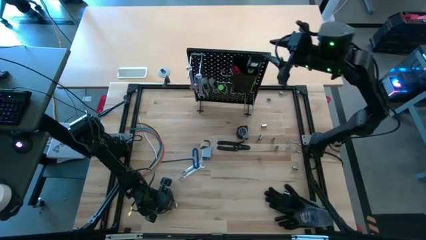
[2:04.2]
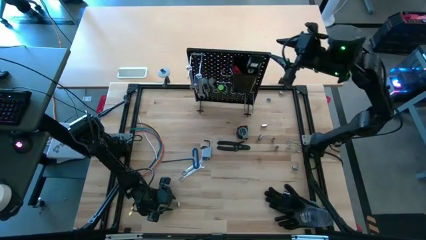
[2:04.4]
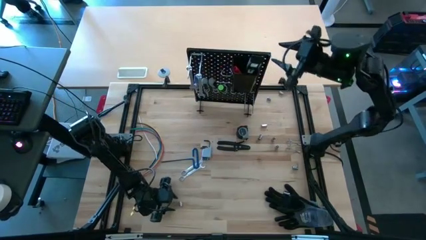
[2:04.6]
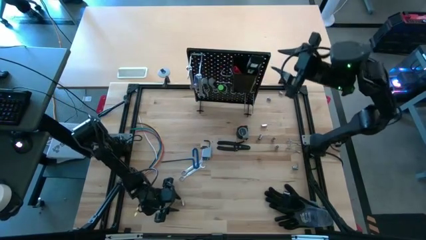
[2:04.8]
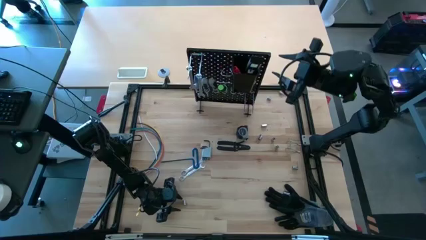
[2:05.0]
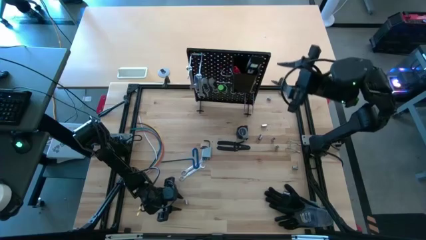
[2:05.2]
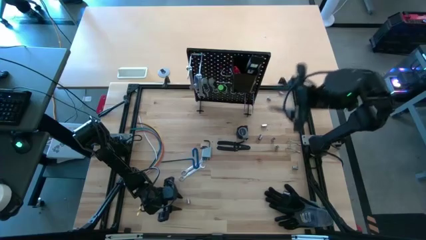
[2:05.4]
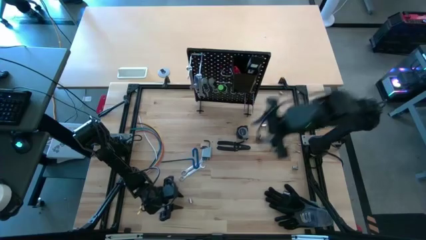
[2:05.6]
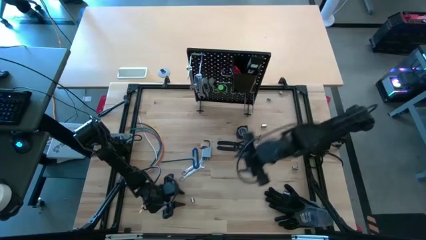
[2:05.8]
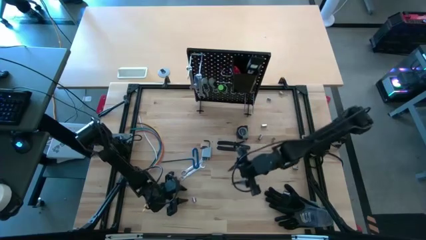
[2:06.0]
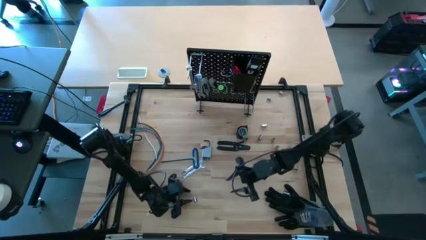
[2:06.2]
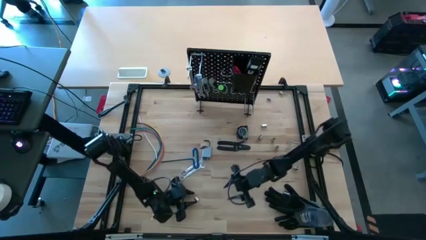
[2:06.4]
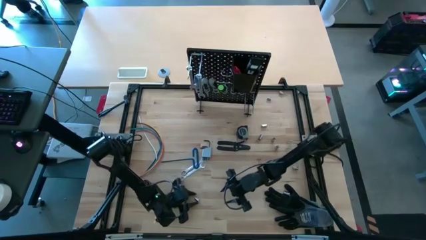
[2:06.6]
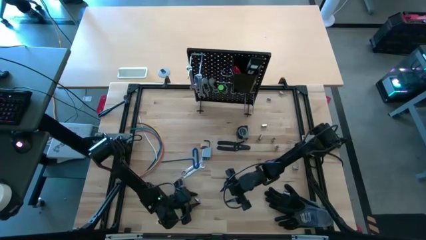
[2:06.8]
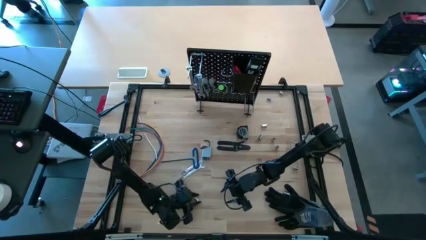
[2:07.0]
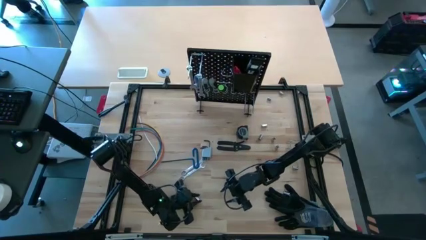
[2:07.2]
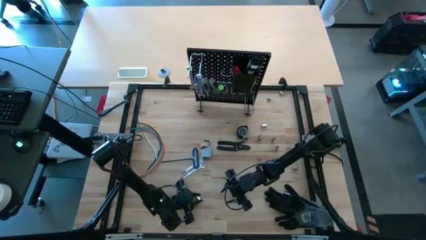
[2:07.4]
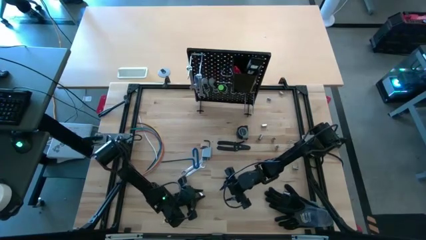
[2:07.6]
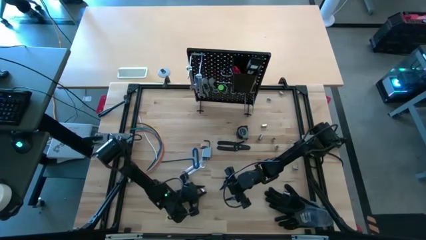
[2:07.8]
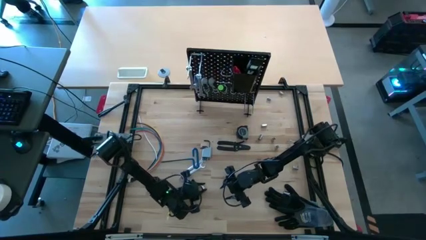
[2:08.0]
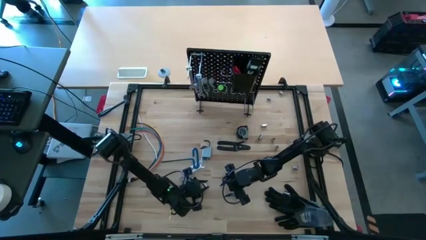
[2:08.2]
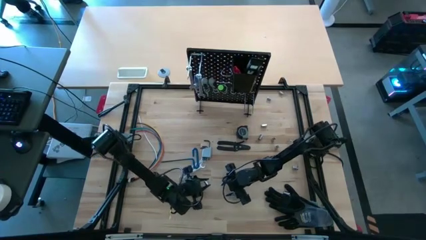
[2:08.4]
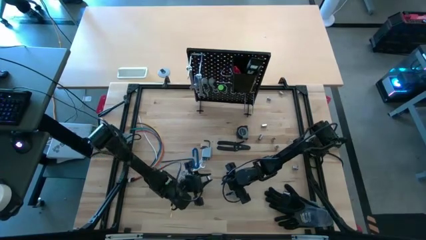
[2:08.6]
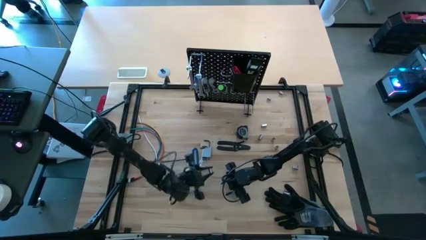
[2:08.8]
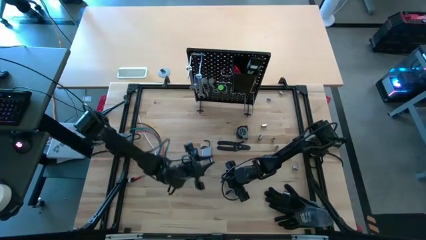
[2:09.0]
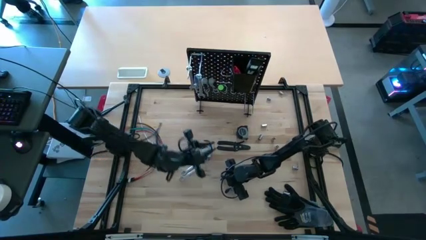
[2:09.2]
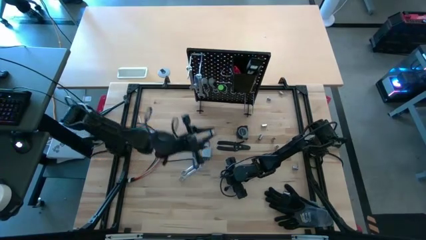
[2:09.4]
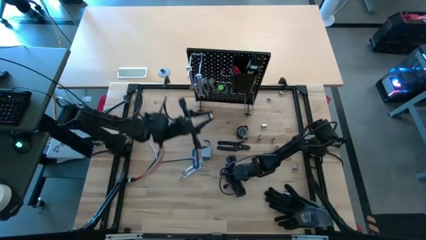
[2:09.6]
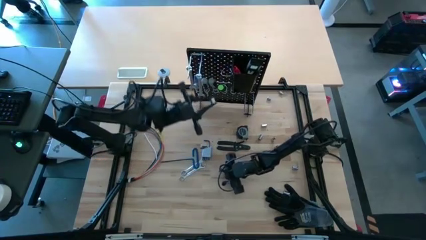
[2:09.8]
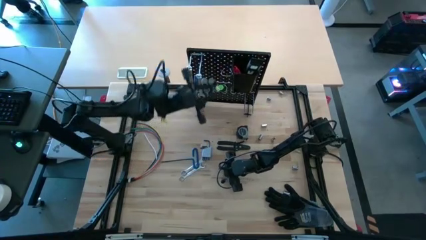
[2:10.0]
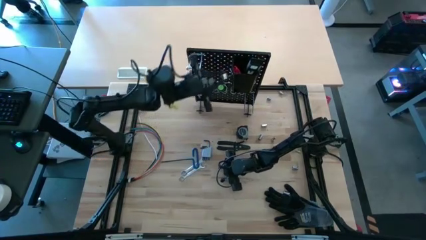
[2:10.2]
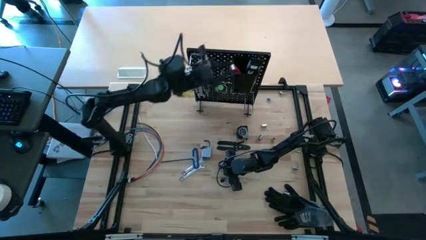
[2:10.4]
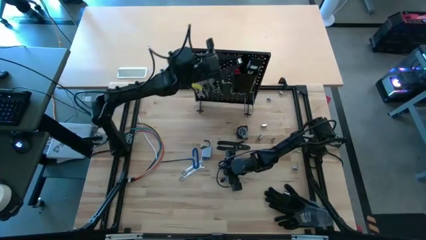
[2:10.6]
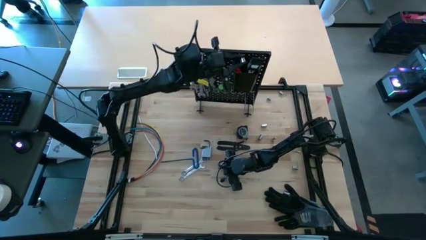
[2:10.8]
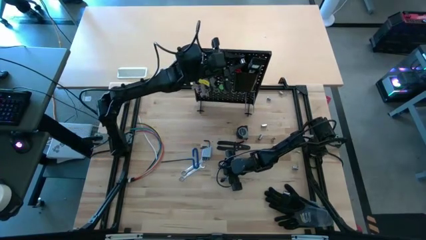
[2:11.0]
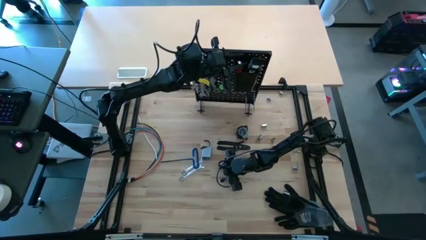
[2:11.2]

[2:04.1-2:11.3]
Task: Hang tools onto peg board
Put the socket into the black bin on the peg board

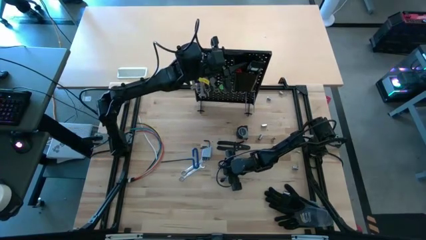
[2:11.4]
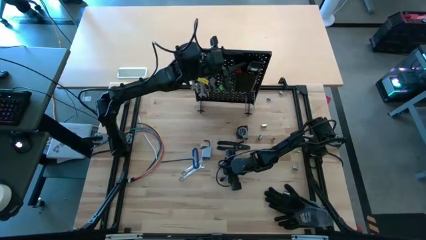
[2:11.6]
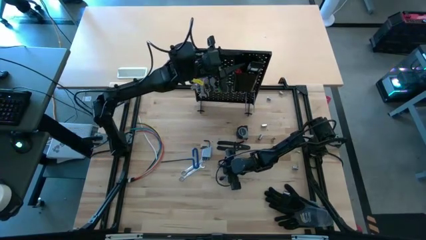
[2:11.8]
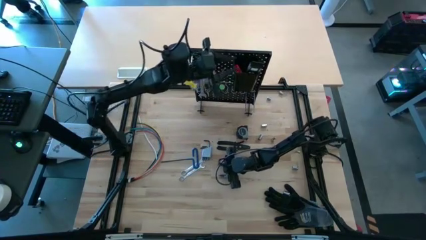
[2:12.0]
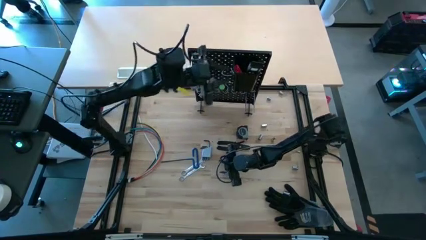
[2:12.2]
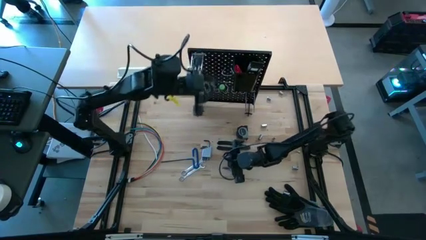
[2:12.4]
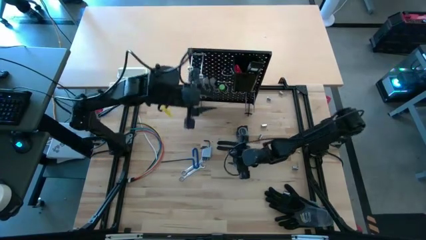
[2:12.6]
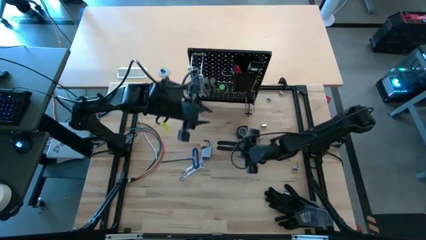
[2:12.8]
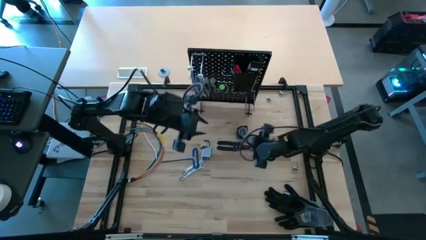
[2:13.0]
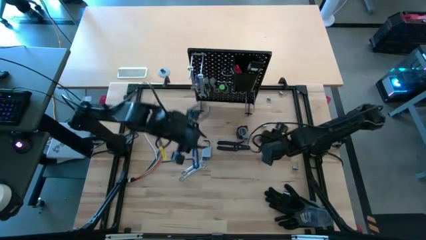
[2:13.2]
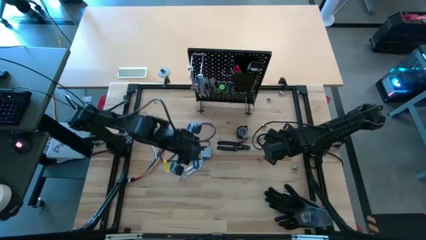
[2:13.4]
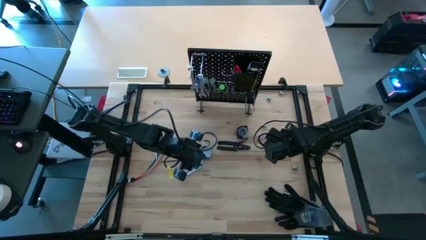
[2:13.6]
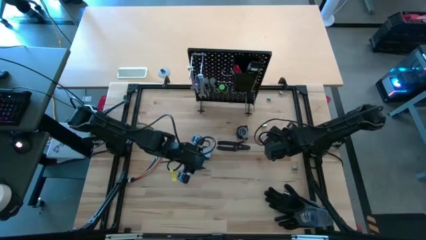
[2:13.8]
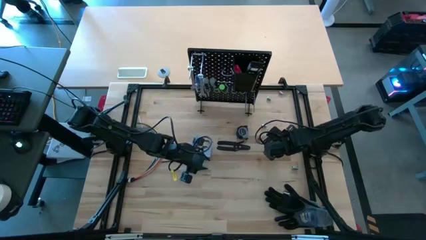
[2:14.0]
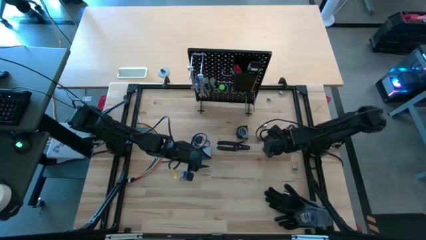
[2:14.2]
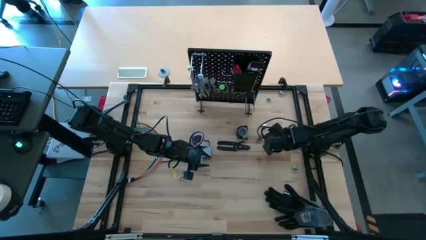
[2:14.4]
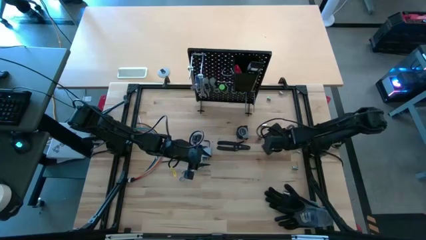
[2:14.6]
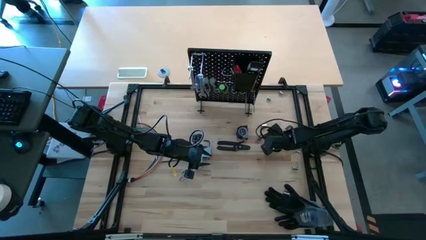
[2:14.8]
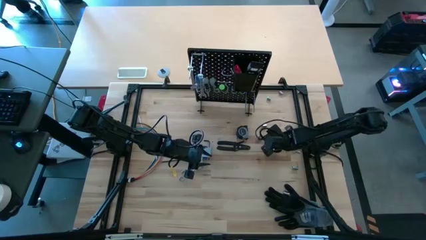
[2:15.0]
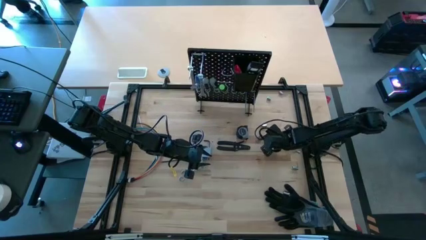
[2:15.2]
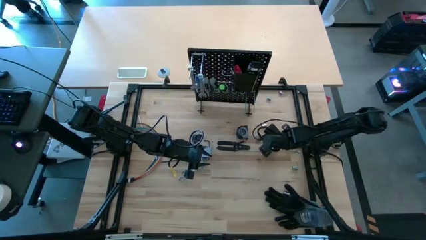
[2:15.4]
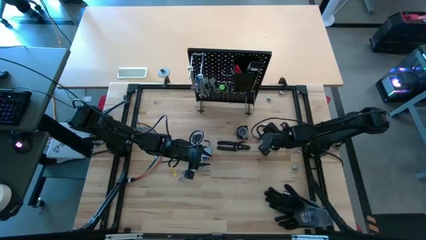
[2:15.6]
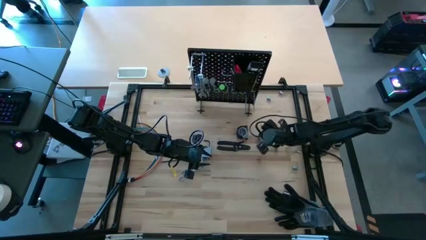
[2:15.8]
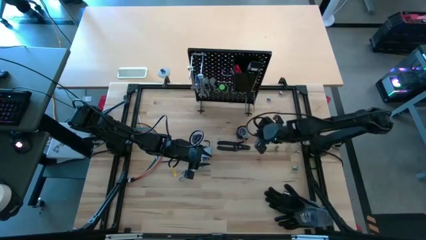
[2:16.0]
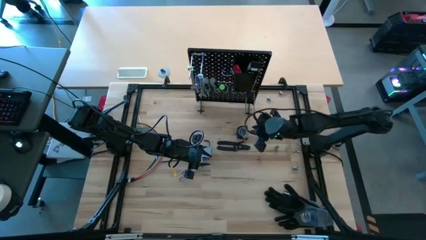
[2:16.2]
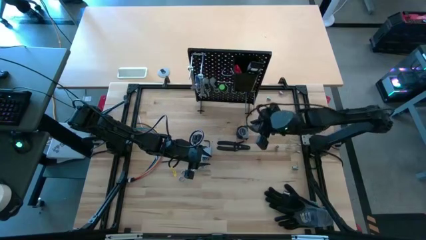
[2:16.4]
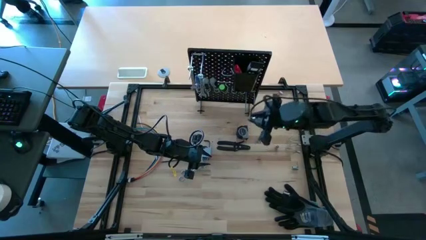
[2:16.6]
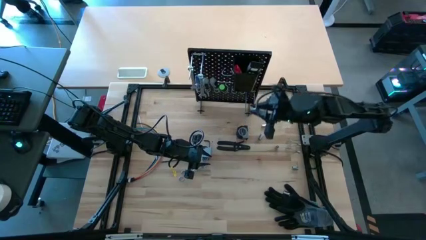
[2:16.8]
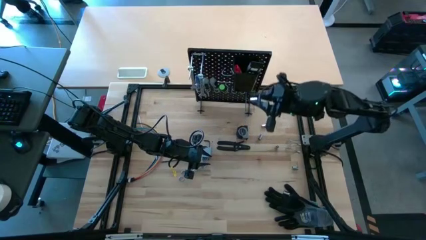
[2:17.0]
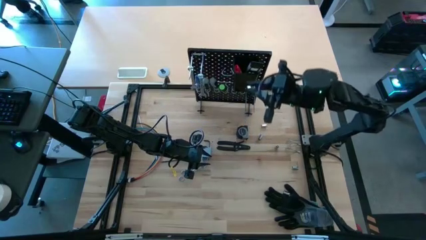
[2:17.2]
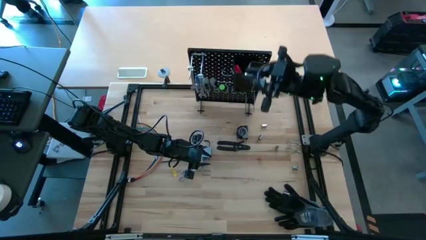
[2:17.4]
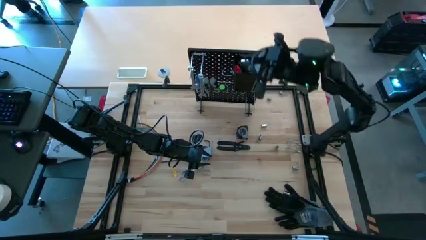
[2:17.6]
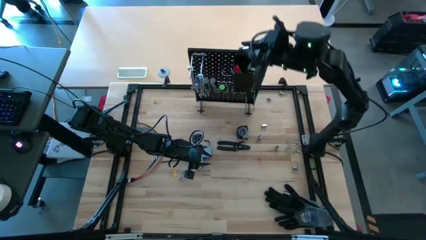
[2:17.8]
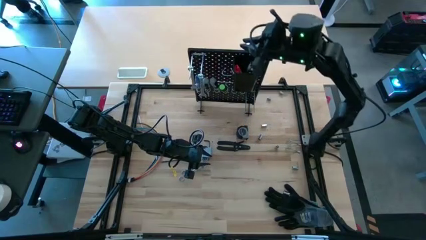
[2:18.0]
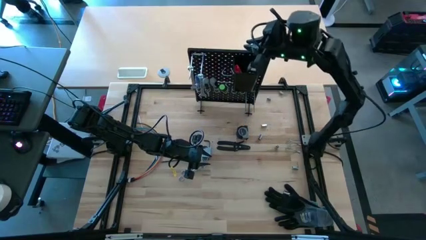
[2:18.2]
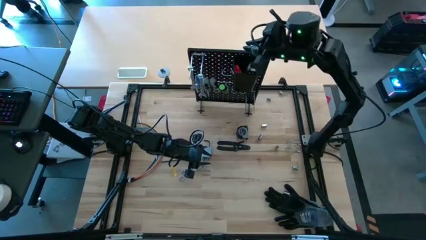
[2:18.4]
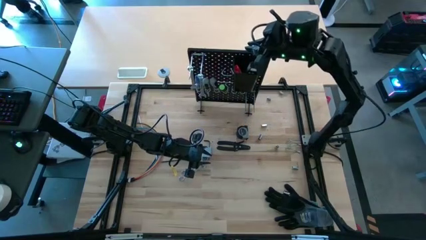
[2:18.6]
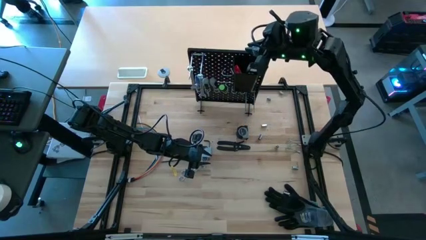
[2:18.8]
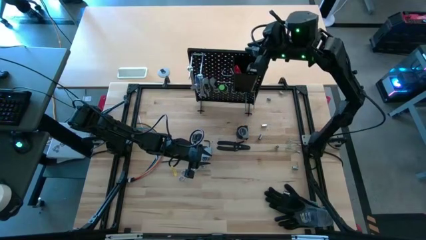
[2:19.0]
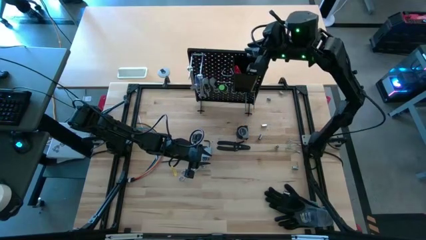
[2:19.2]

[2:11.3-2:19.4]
Put the socket into the black bin on the peg board
